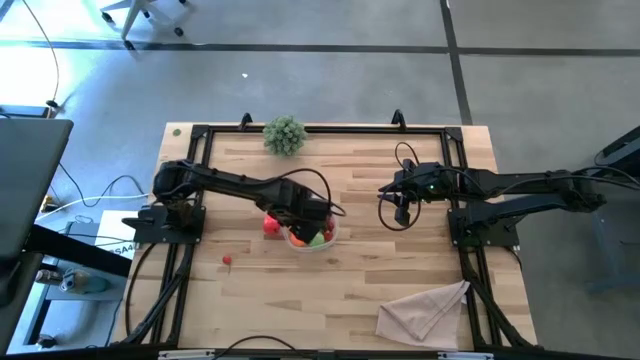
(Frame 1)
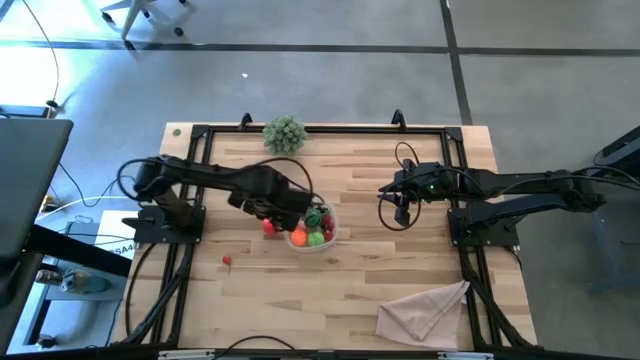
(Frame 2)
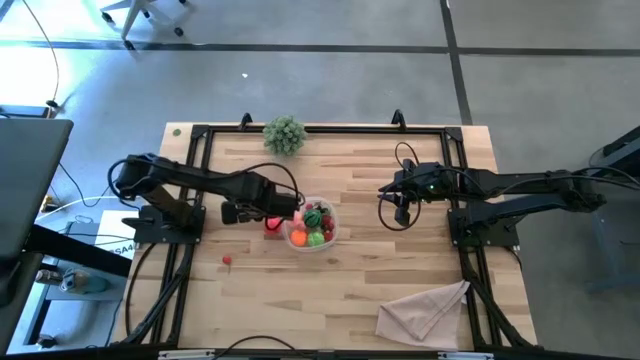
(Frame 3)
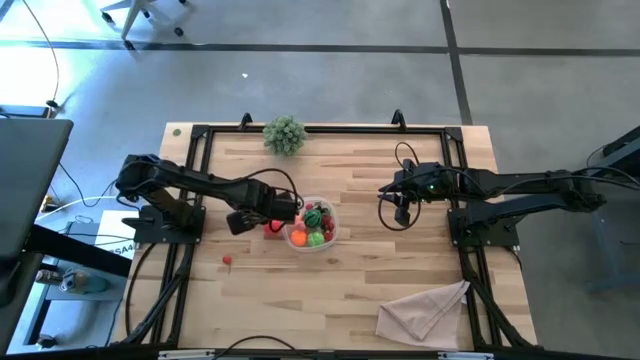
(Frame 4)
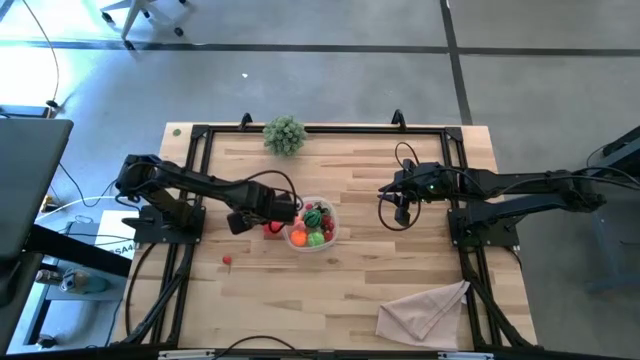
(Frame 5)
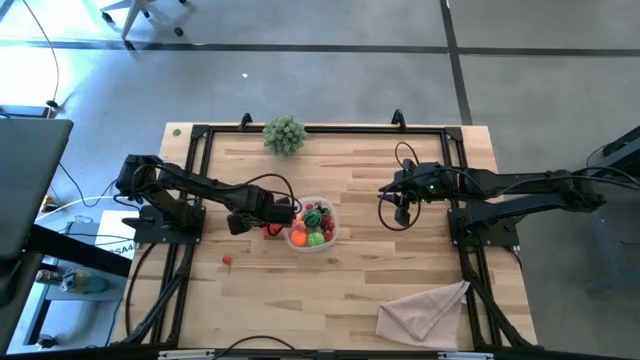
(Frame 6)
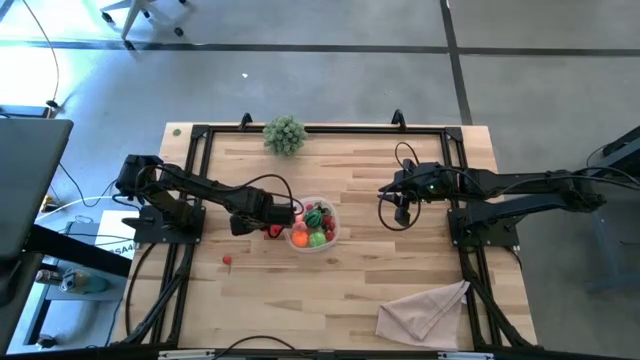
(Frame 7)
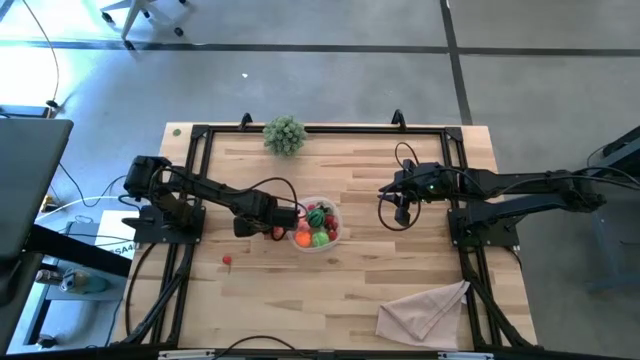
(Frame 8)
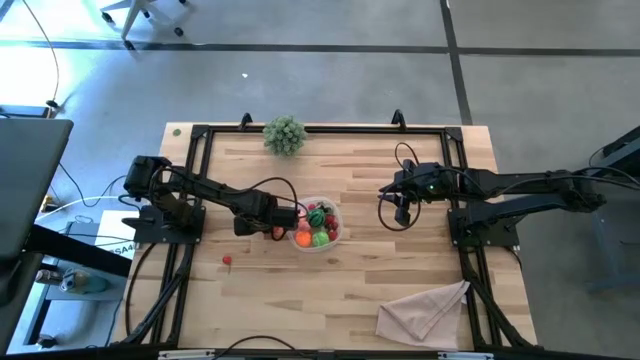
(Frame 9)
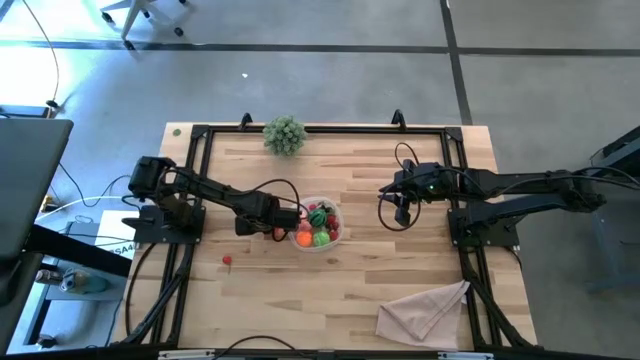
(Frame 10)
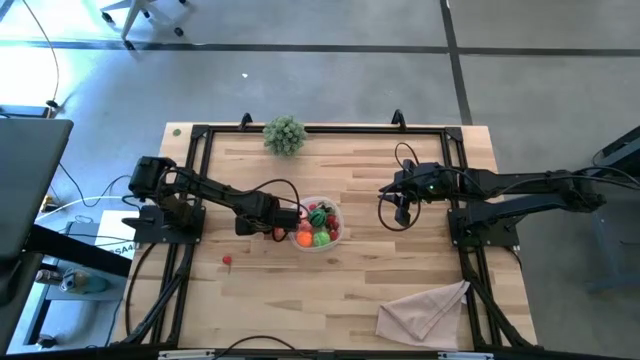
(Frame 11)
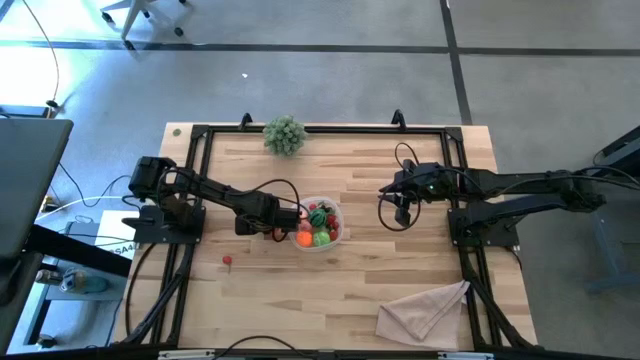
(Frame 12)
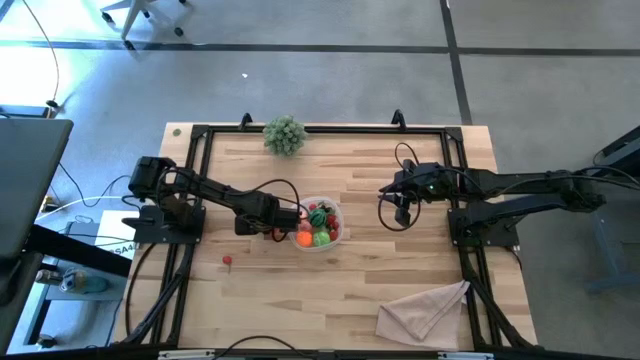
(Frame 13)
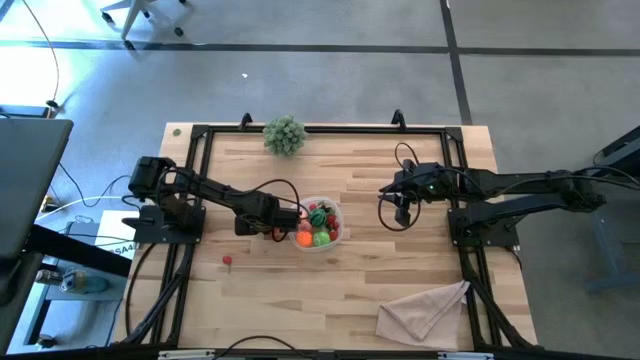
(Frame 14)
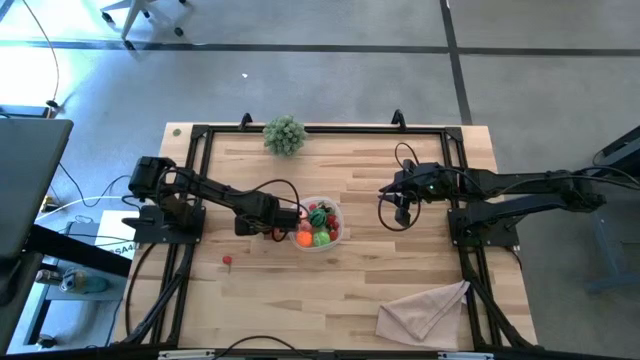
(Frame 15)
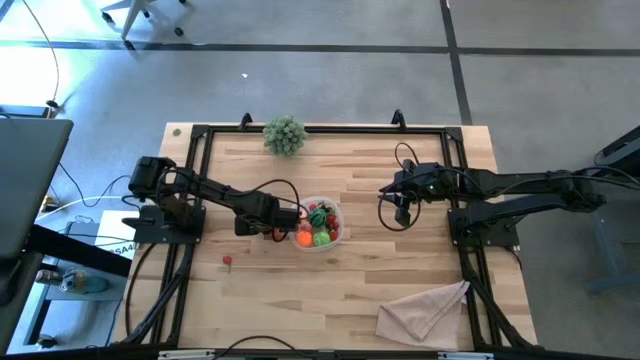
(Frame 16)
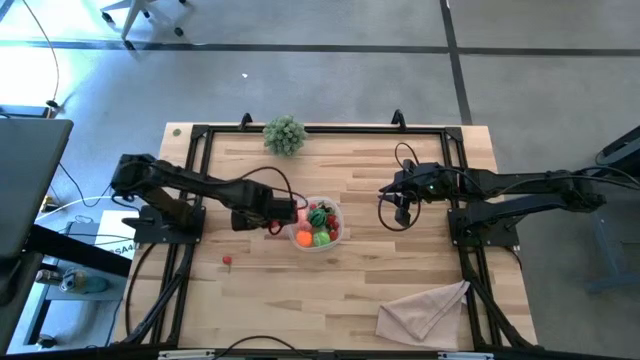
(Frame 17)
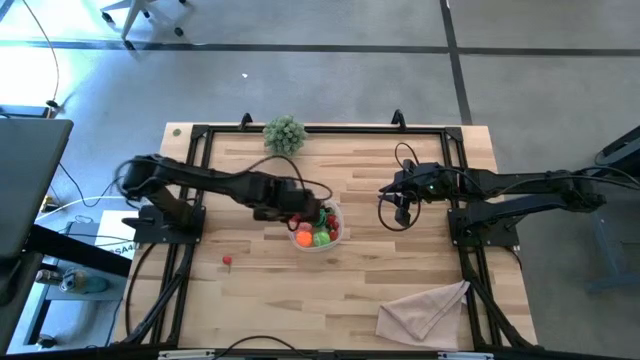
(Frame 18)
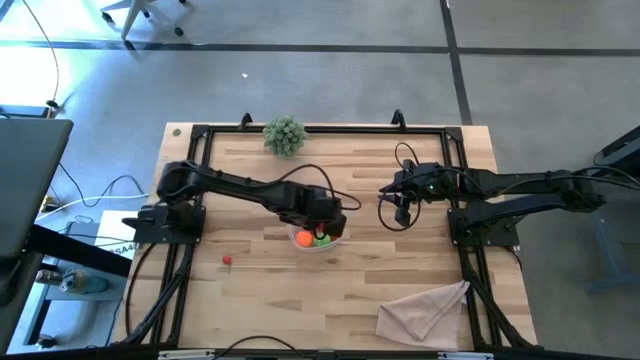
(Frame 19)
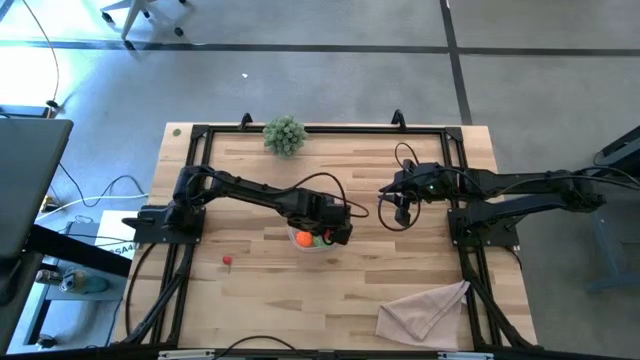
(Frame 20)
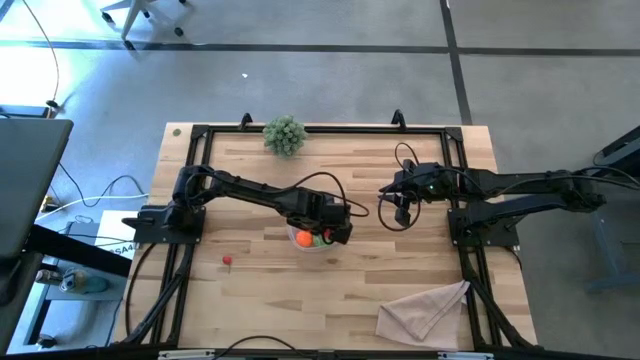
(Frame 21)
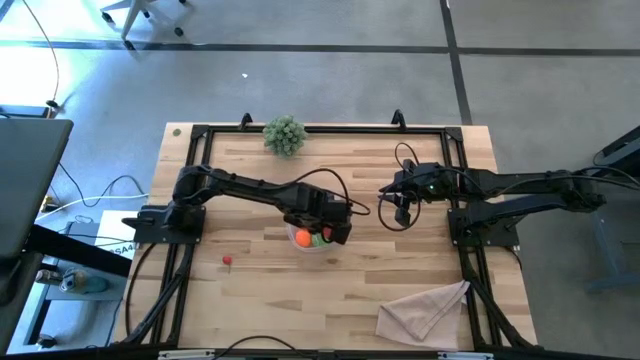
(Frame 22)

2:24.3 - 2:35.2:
Task: Pick and placing Produce into tupperware
Put the apple into the transparent bin

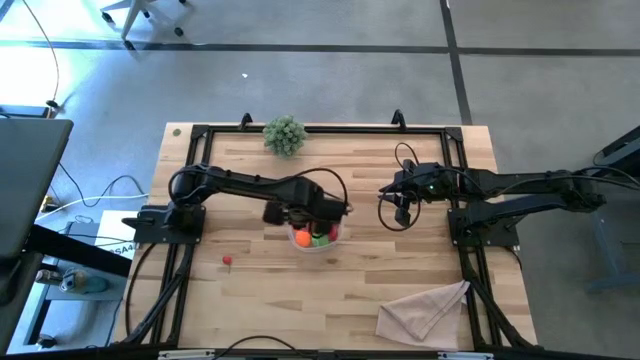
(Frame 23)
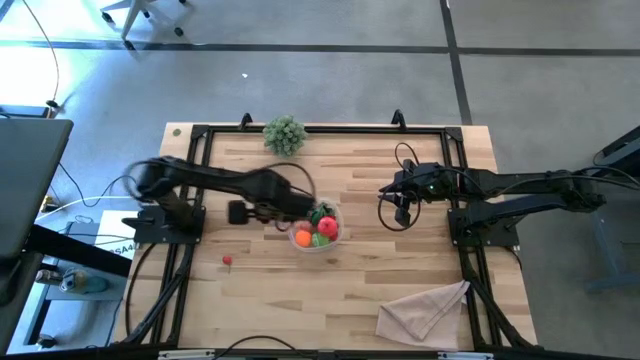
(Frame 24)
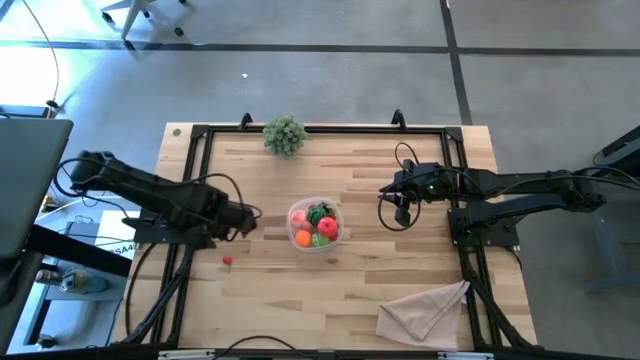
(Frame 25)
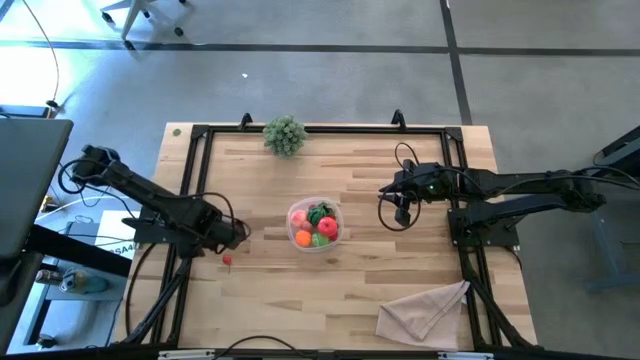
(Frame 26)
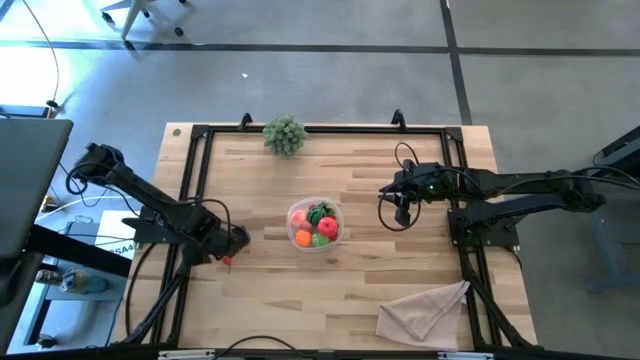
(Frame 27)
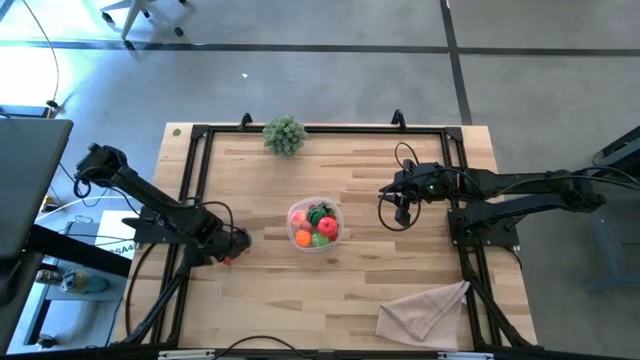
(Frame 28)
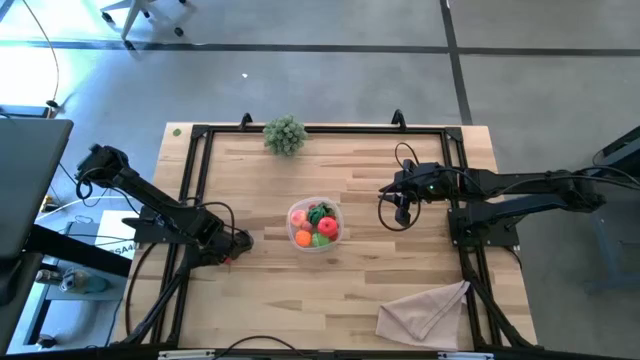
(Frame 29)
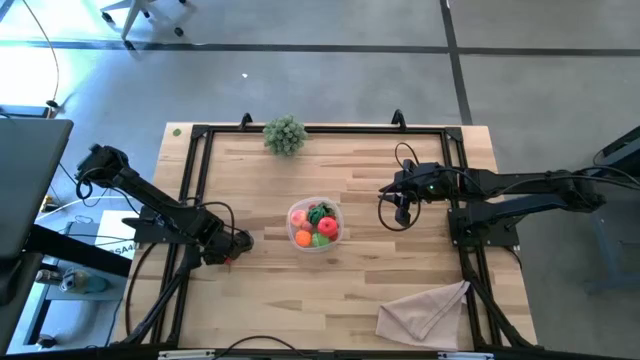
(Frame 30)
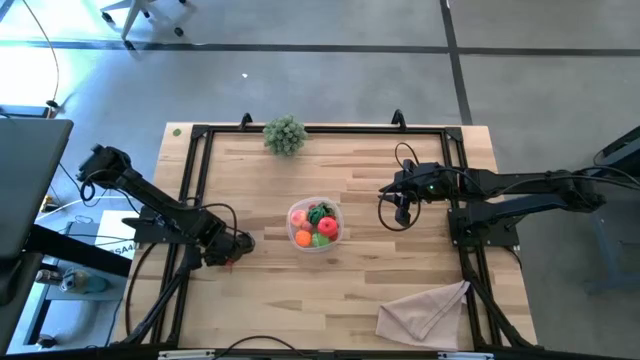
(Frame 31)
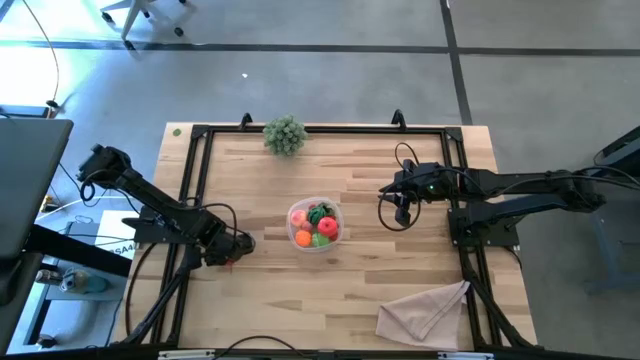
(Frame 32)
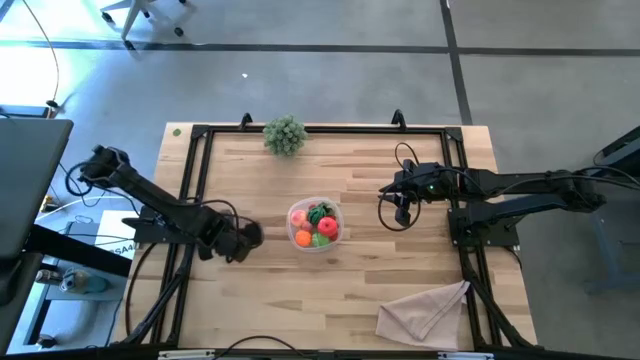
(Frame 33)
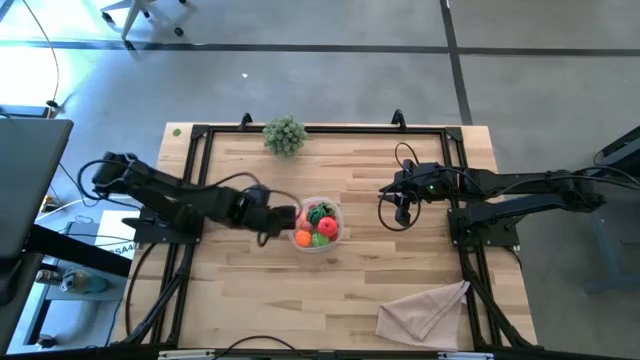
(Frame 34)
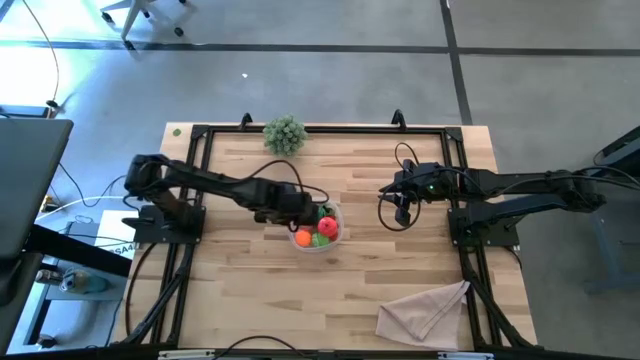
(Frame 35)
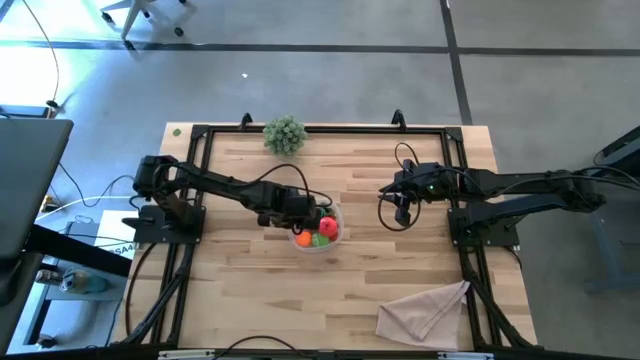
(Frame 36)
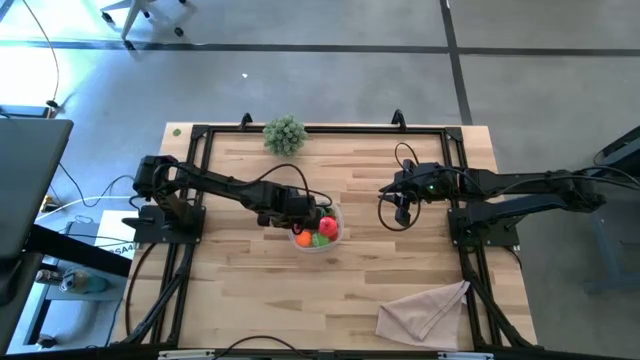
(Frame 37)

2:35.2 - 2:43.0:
Put the cherry into the transparent bin

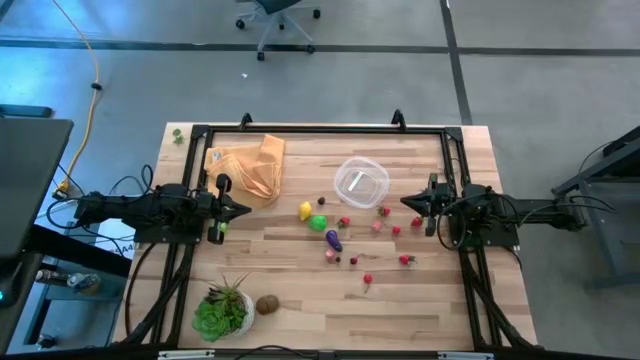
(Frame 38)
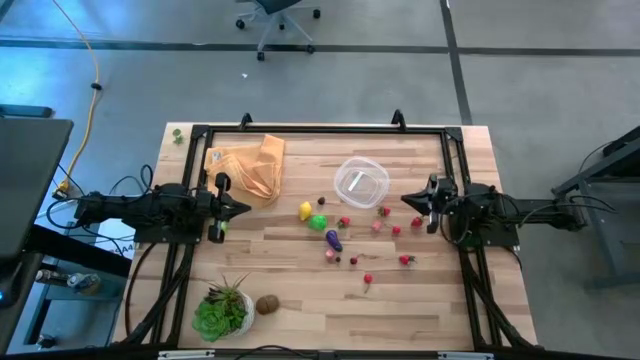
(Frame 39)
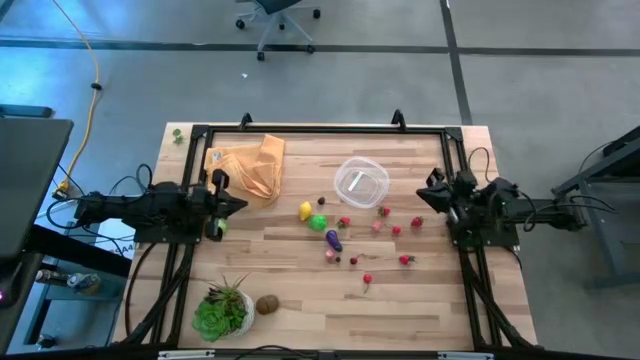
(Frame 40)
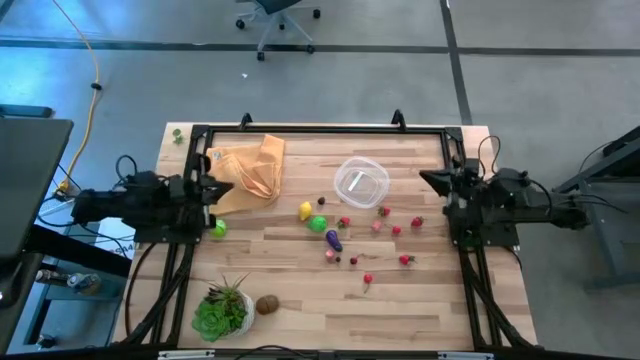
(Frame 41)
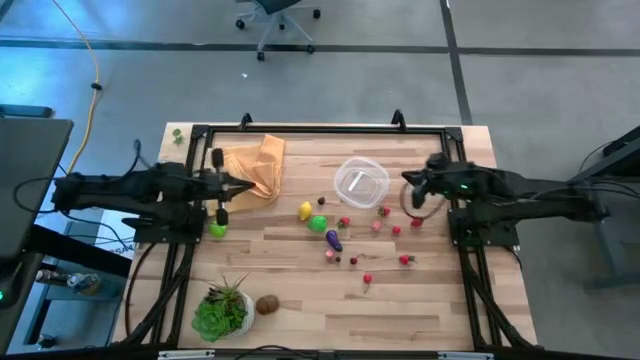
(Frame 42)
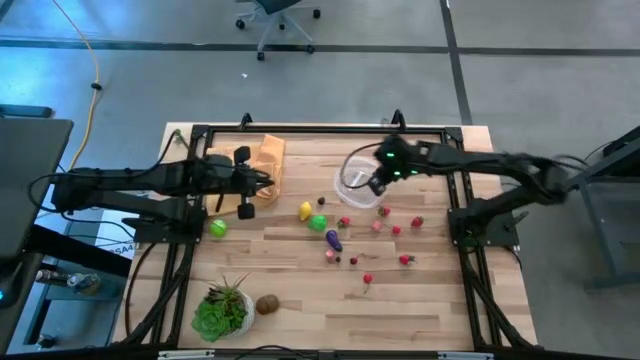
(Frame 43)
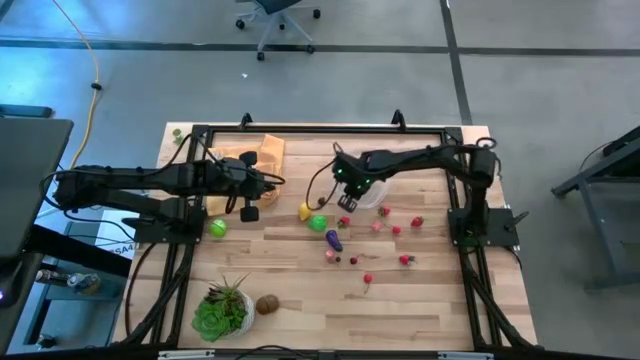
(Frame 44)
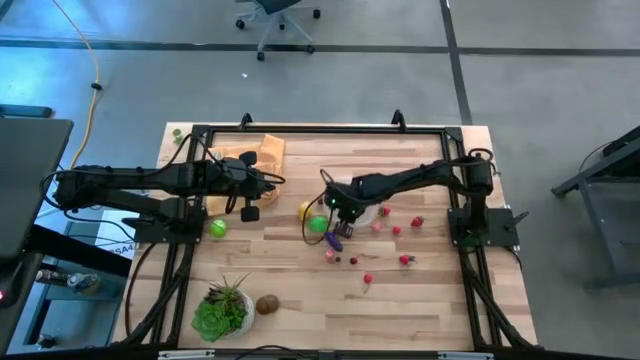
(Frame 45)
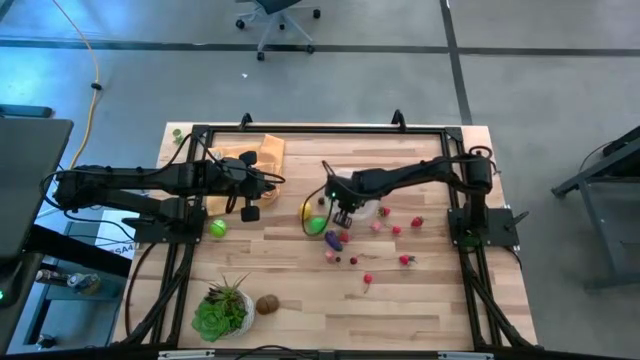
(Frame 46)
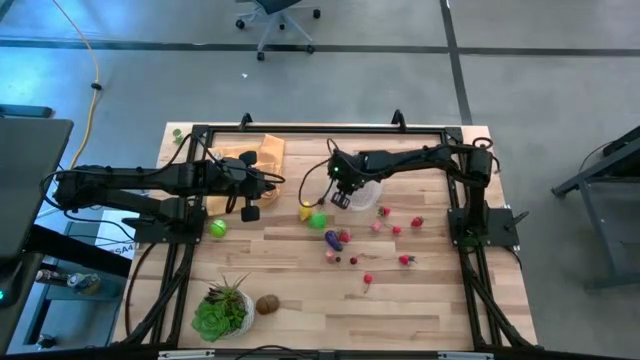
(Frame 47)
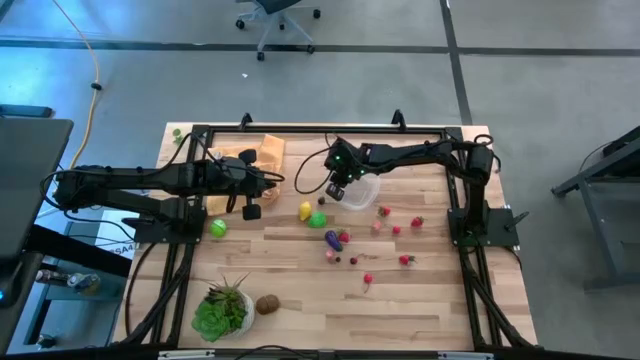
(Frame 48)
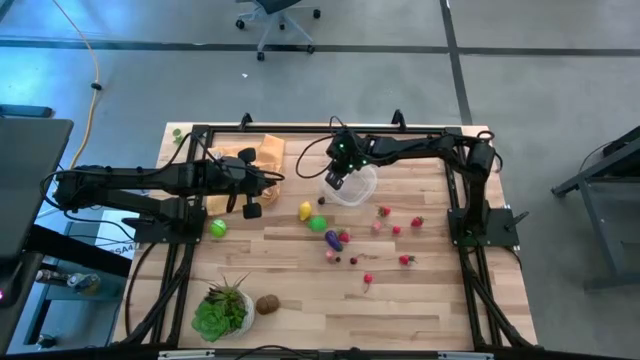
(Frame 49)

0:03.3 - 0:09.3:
Task: Pick and placing Produce into tupperware
Adjust the transparent container
